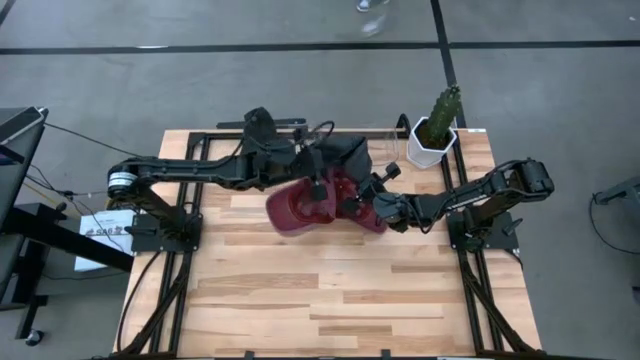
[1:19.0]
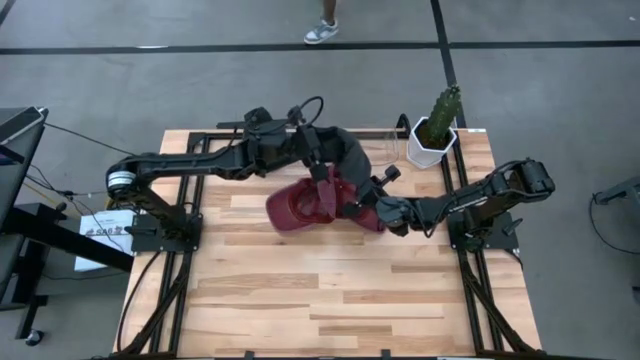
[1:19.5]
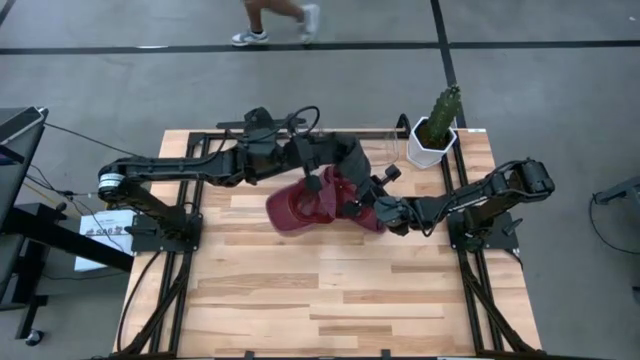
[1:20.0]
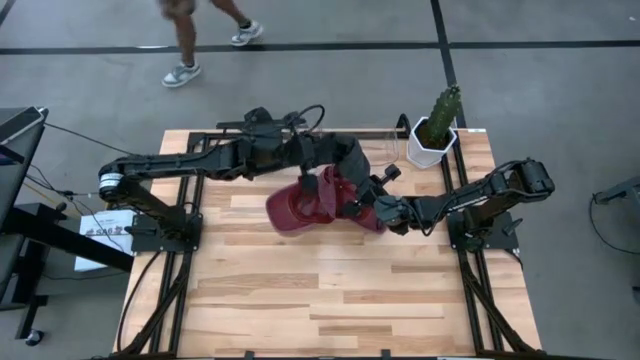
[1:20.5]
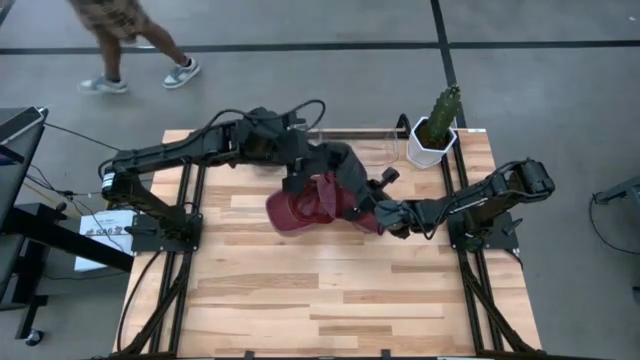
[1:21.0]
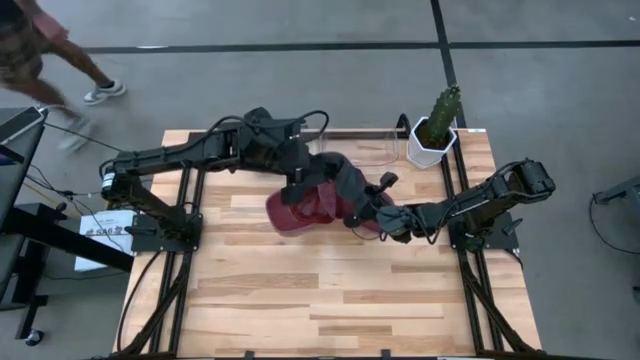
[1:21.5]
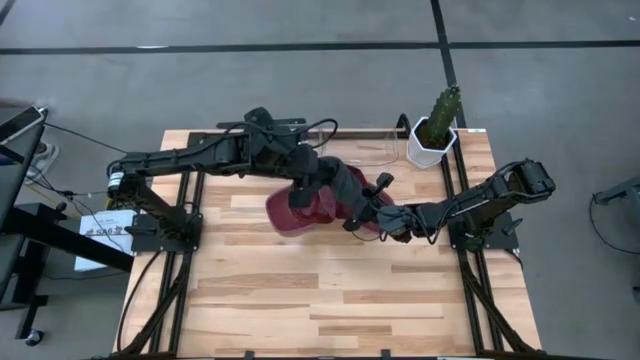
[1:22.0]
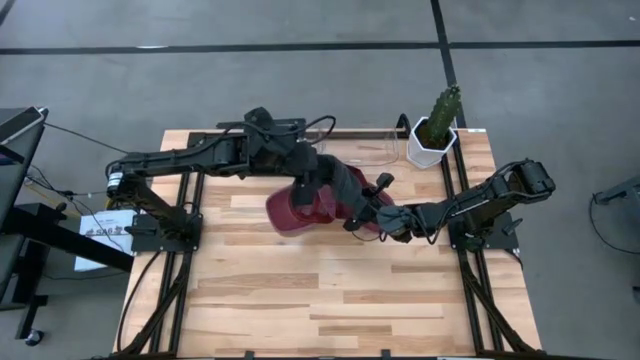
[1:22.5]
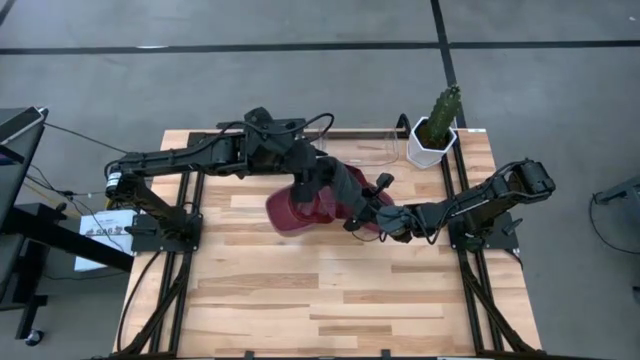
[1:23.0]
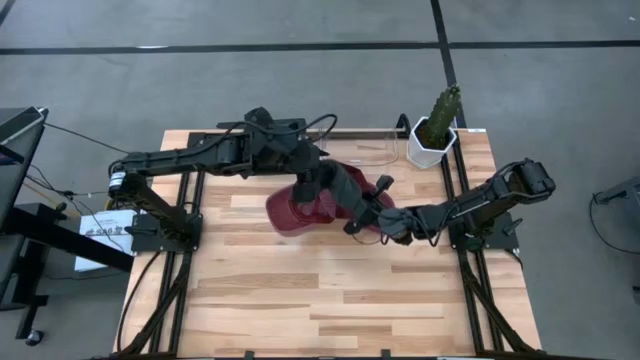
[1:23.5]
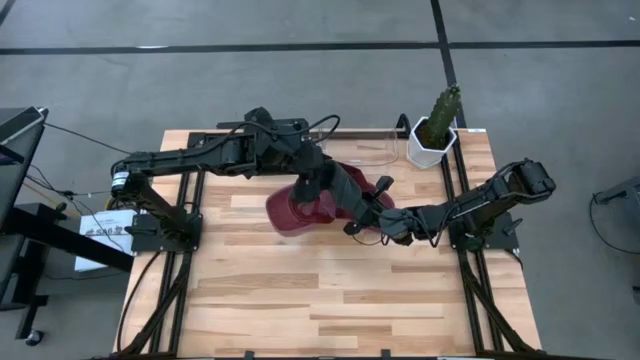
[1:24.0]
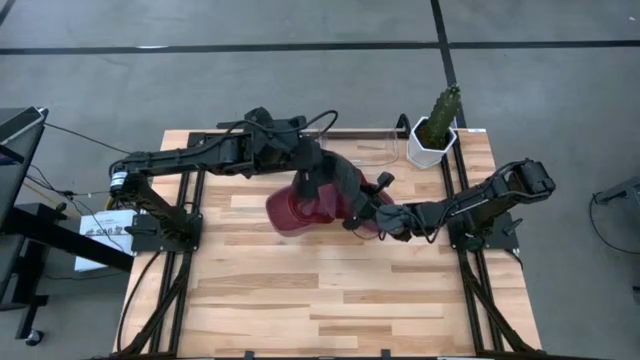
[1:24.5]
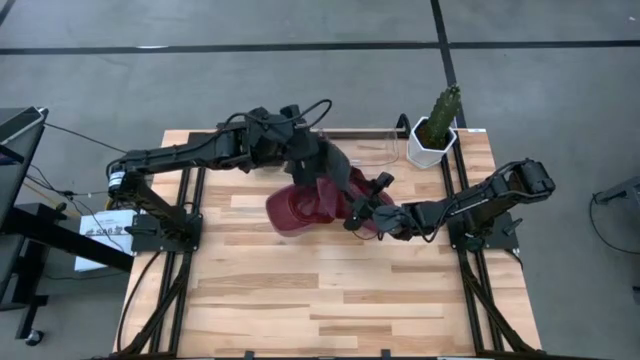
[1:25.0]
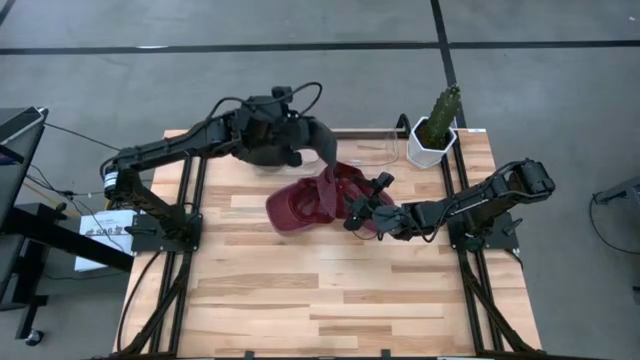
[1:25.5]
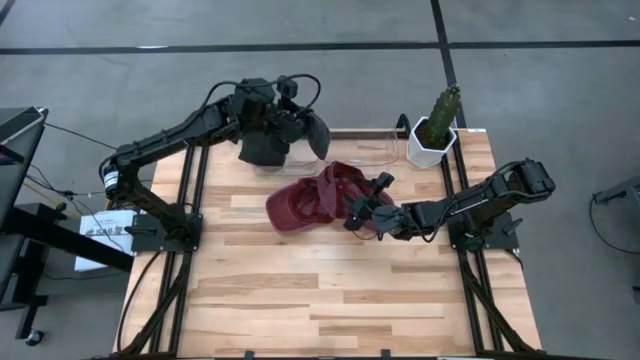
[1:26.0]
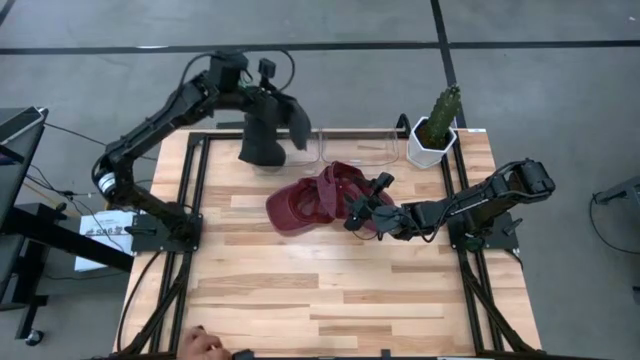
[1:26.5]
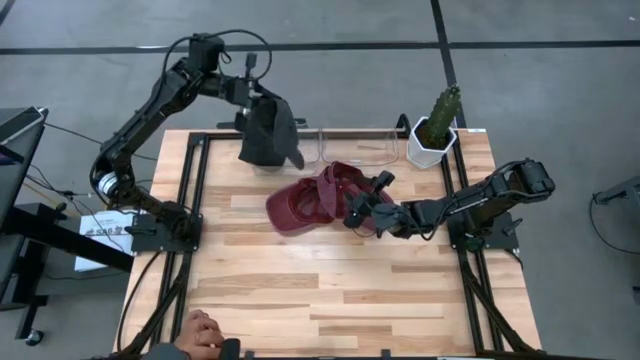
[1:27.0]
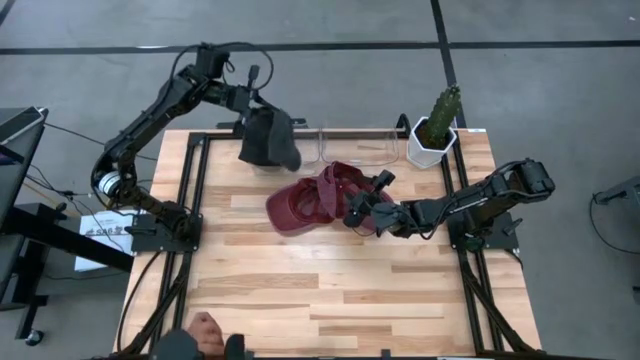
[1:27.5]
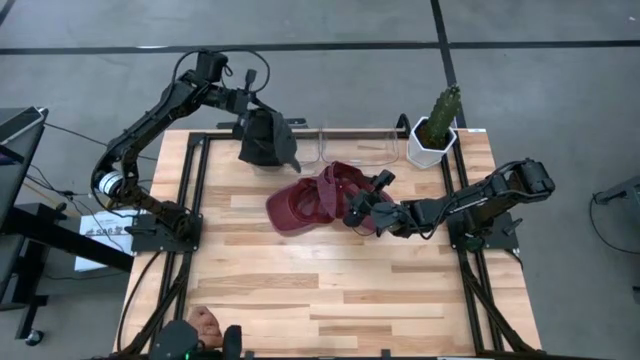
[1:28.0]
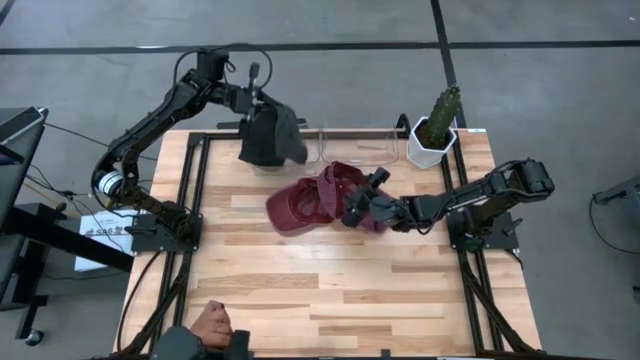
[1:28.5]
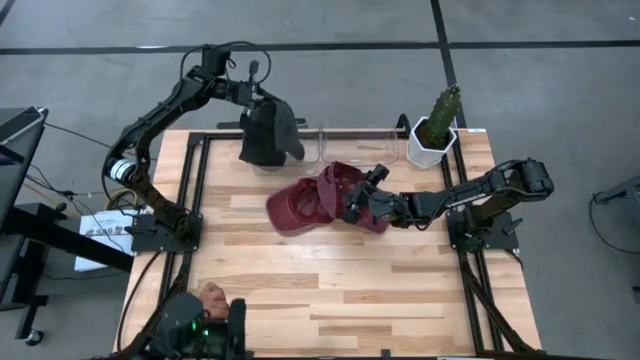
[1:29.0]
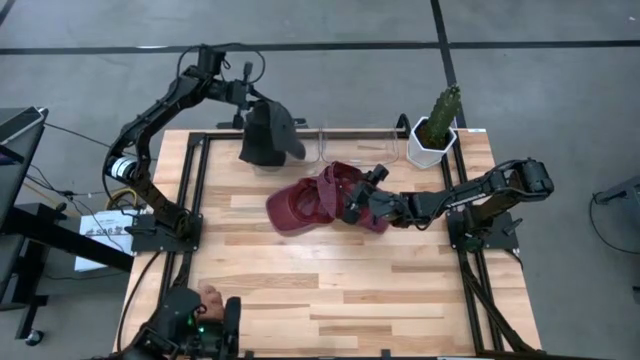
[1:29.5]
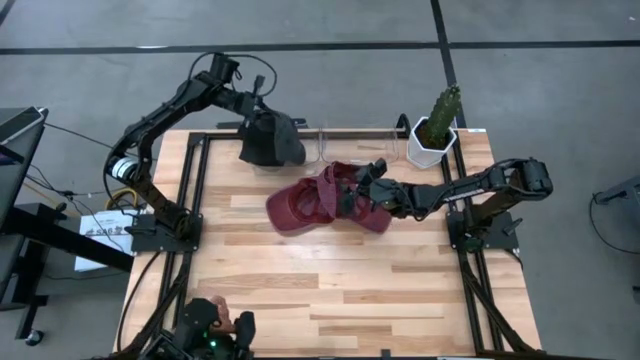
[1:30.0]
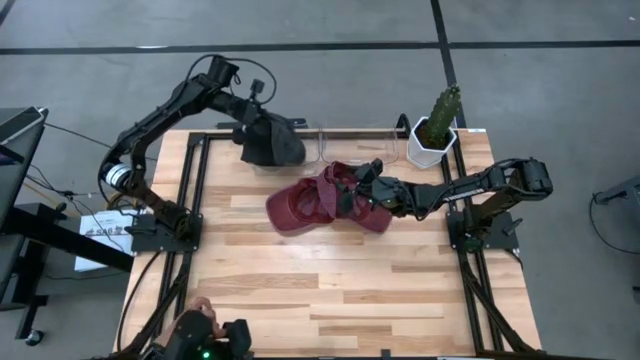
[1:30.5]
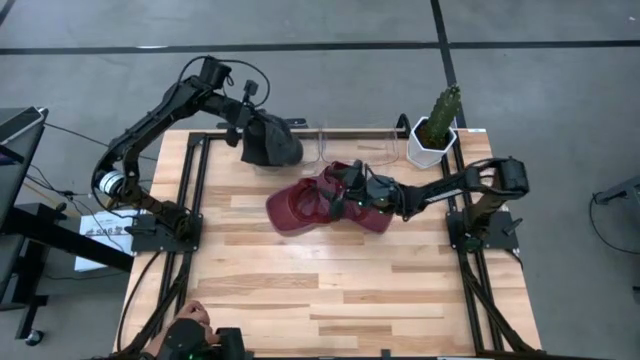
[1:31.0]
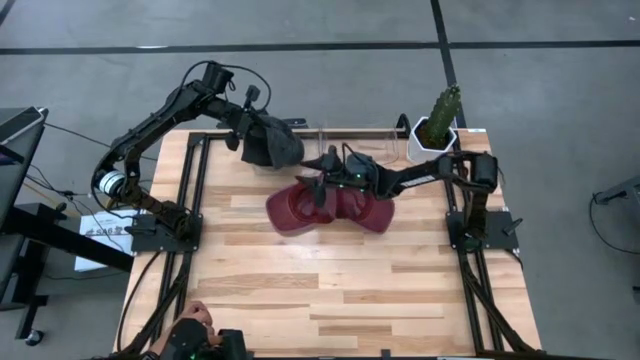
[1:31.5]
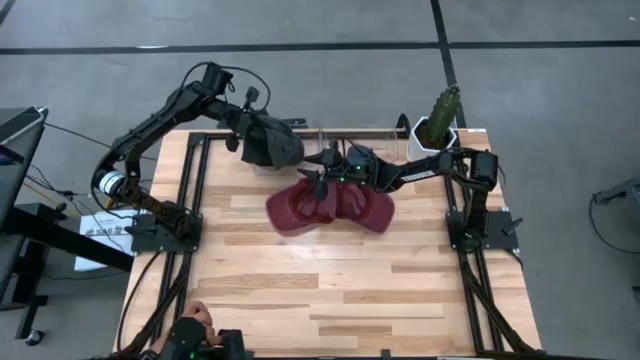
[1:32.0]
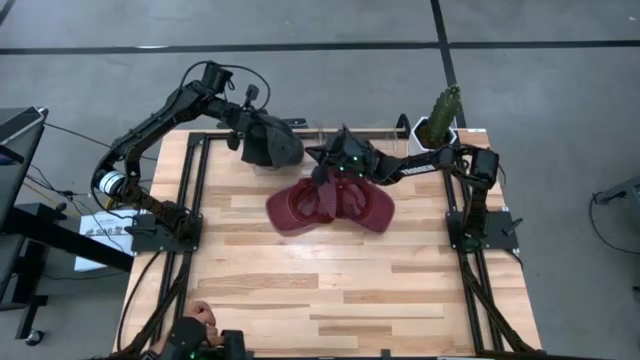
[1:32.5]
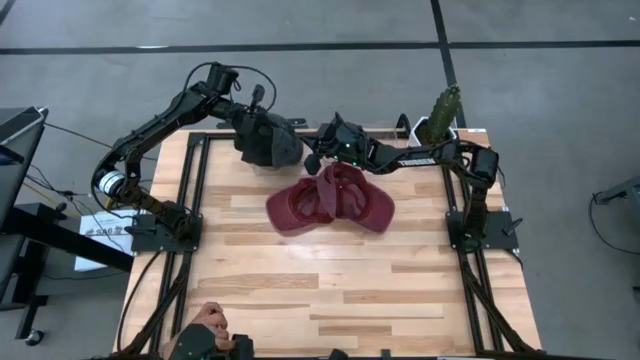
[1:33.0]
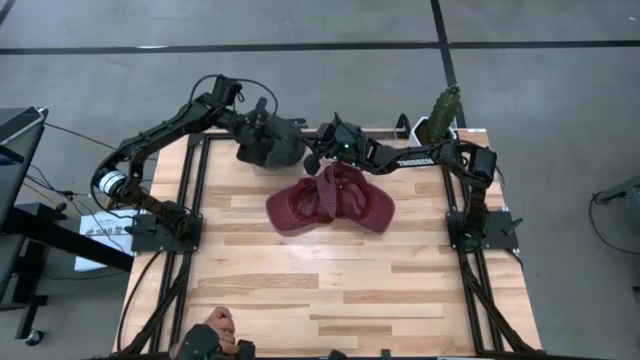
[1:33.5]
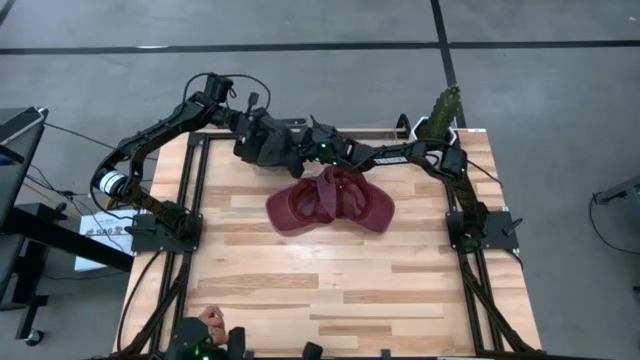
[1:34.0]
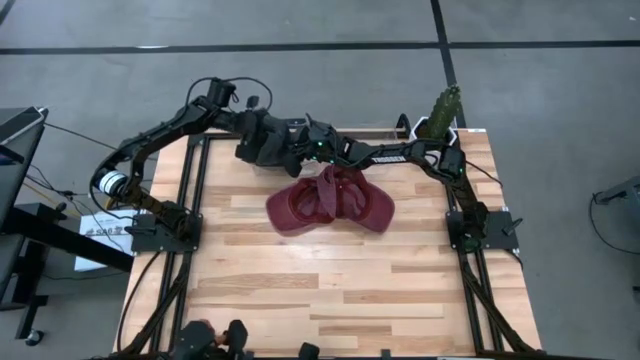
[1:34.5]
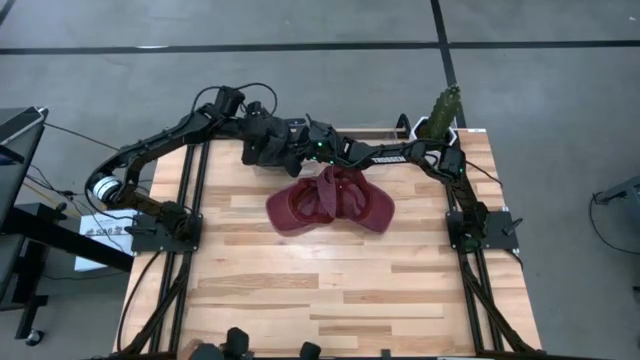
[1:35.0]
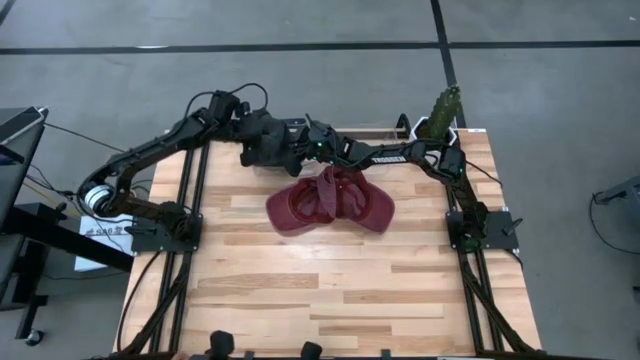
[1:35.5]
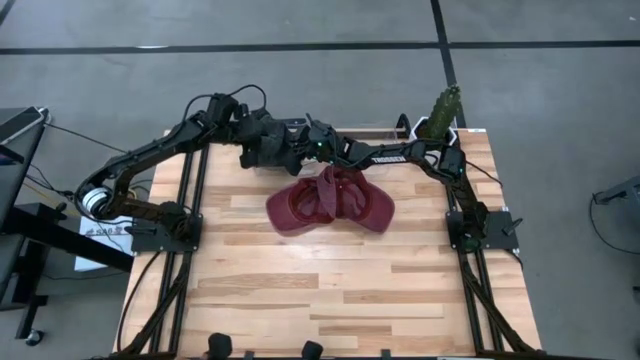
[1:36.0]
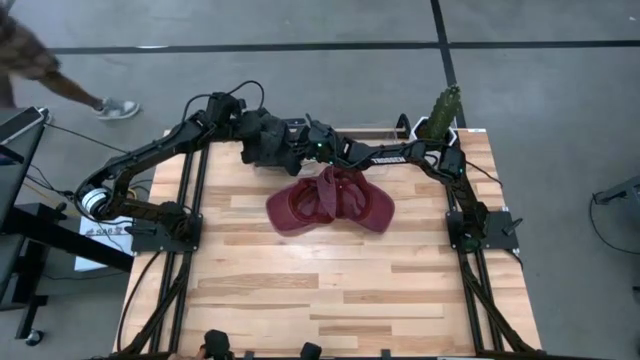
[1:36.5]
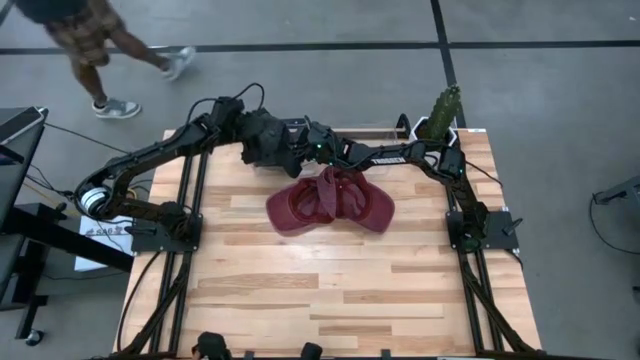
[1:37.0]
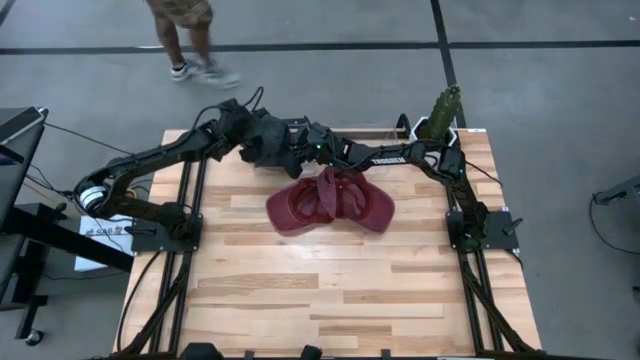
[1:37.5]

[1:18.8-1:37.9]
Task: Pick & Place hat
Put the black cap into the left transparent bin
